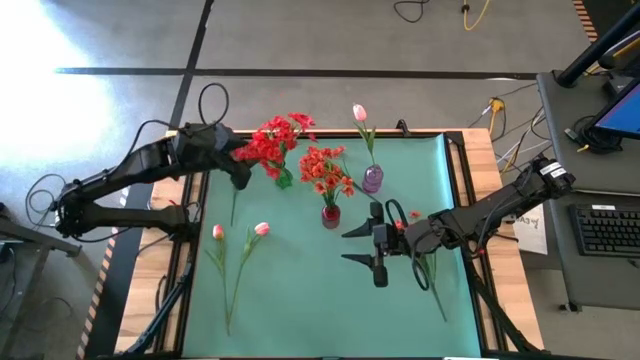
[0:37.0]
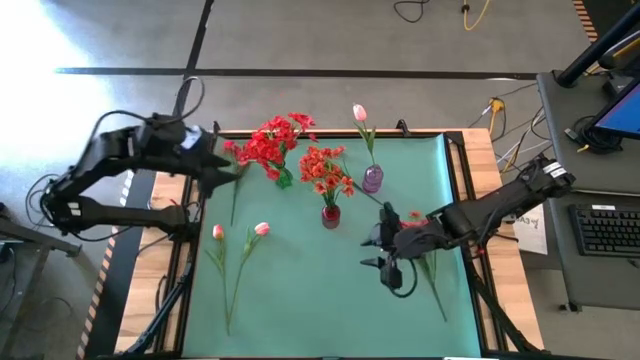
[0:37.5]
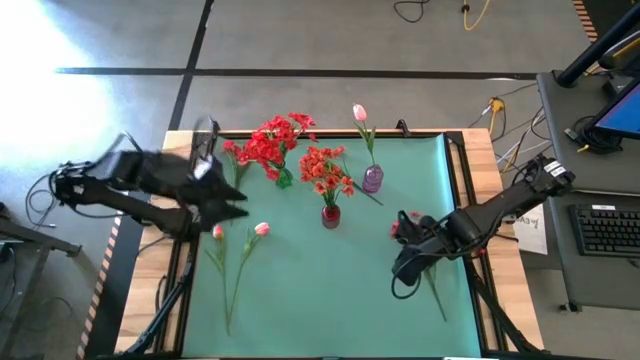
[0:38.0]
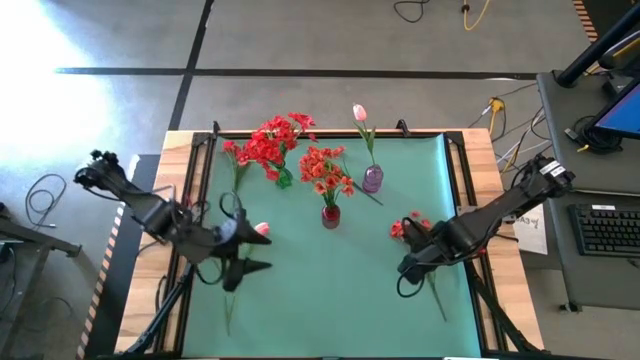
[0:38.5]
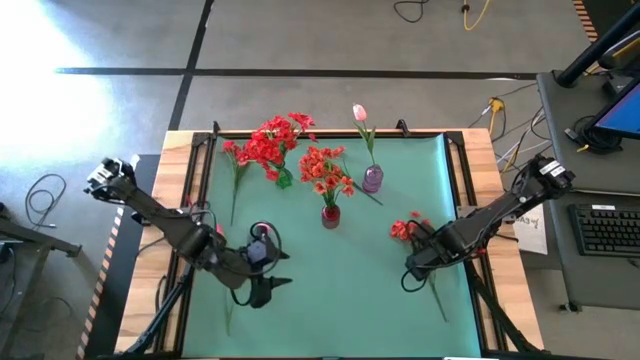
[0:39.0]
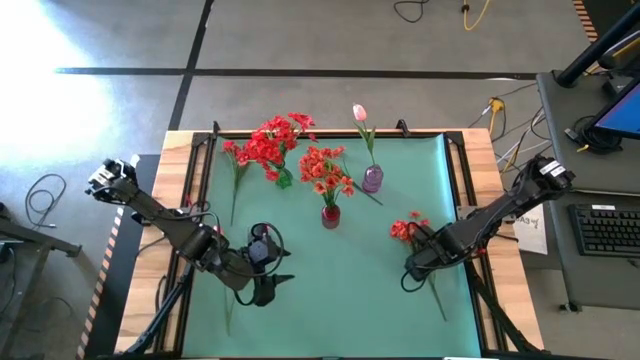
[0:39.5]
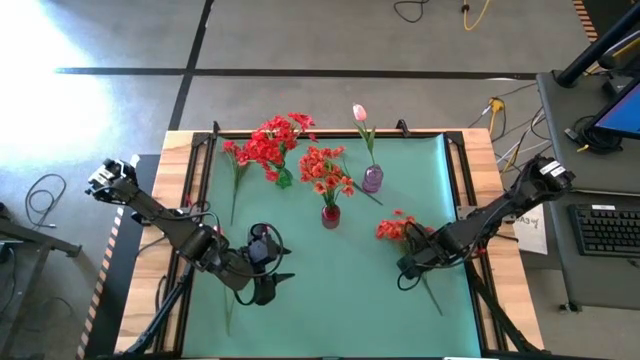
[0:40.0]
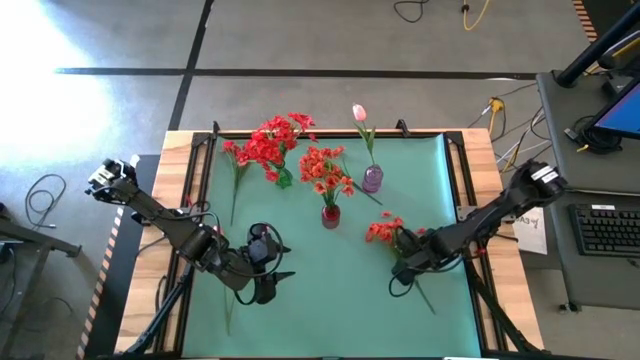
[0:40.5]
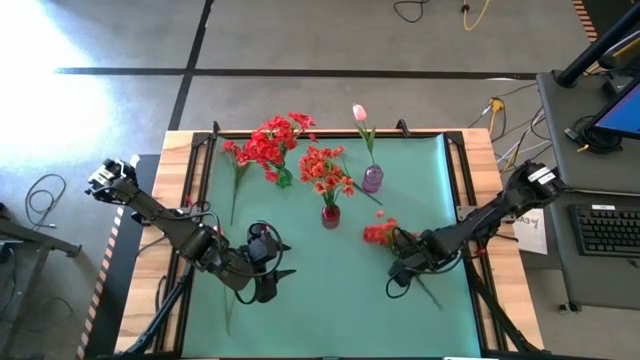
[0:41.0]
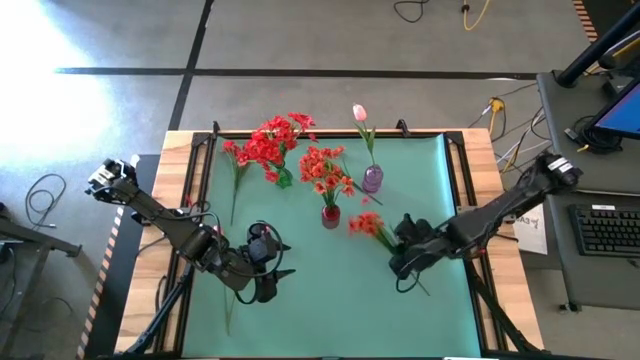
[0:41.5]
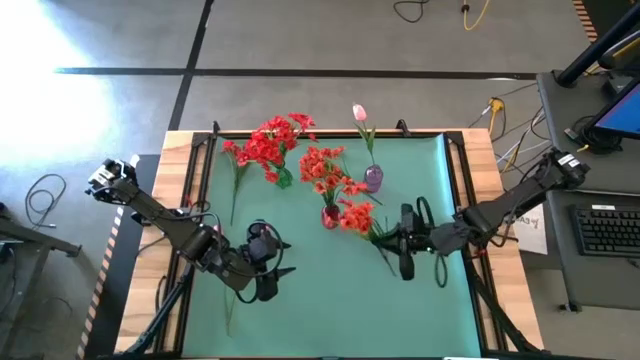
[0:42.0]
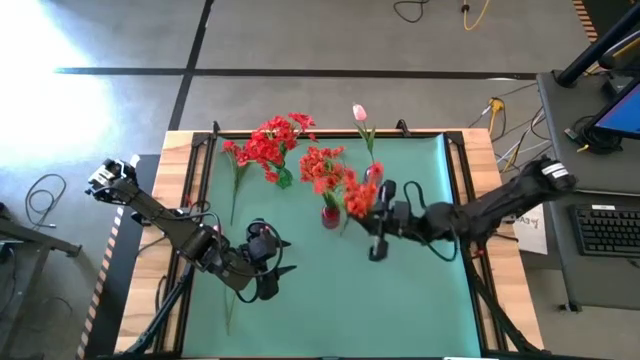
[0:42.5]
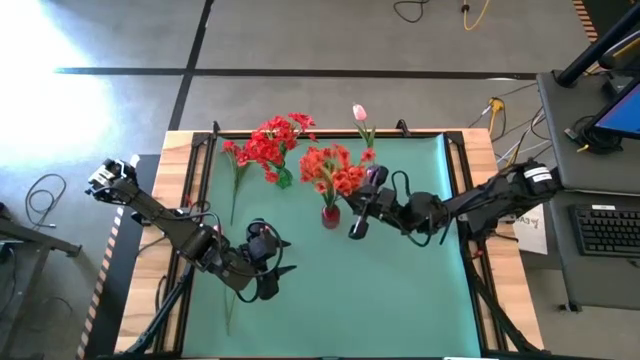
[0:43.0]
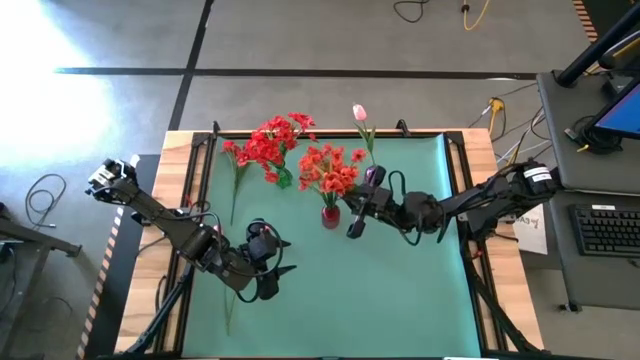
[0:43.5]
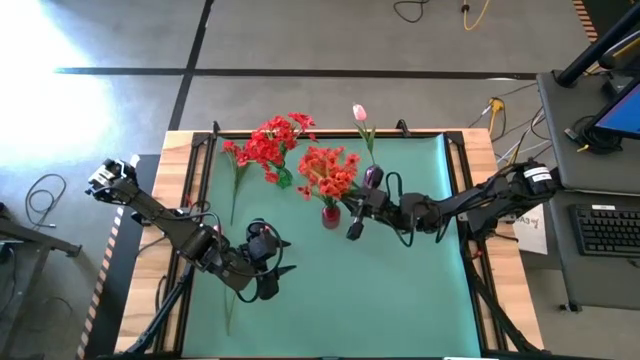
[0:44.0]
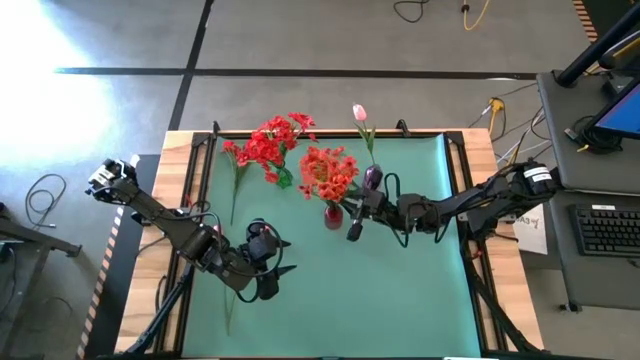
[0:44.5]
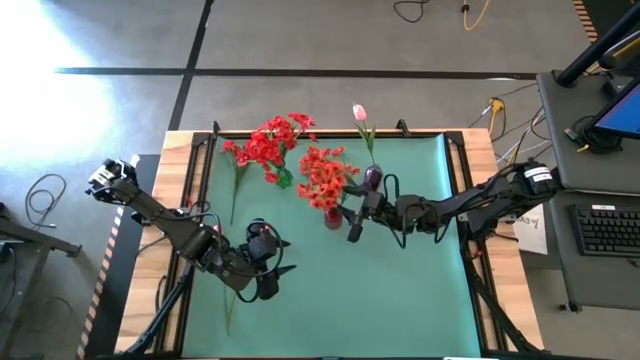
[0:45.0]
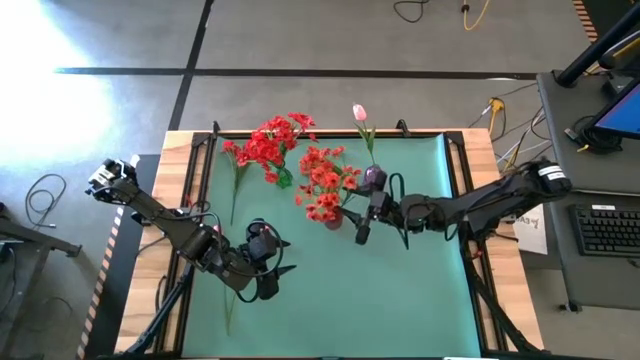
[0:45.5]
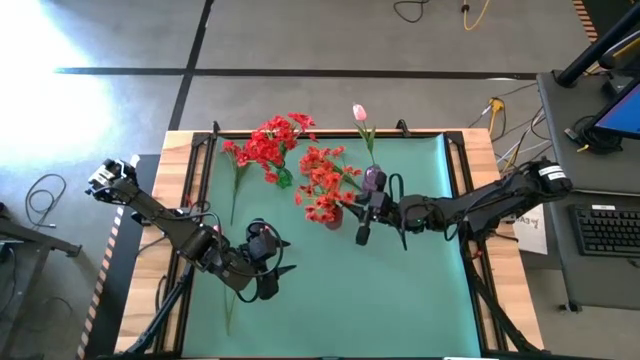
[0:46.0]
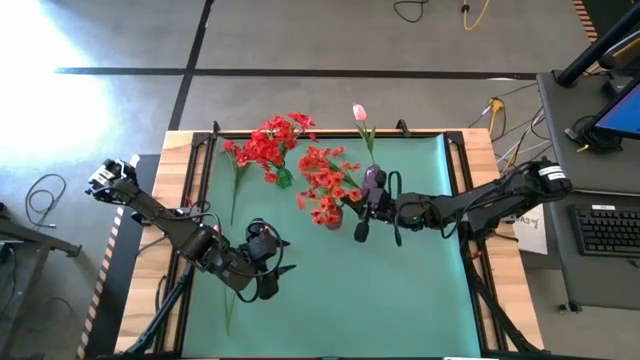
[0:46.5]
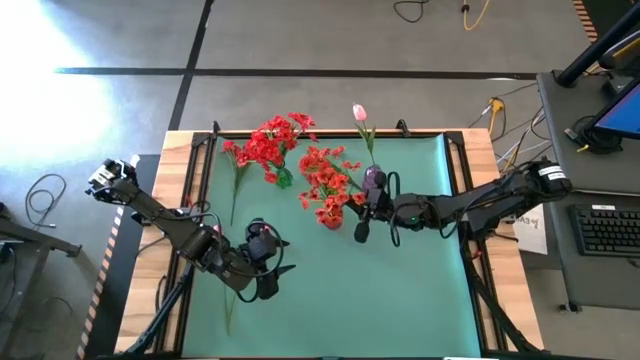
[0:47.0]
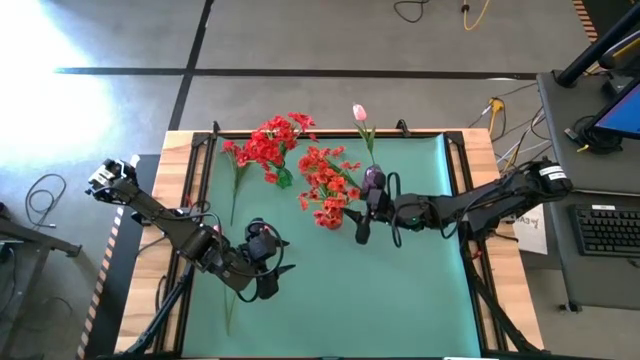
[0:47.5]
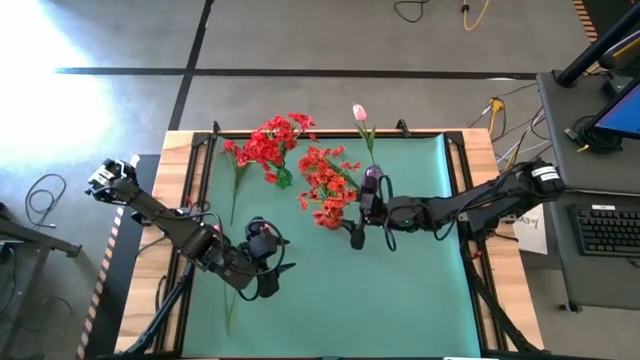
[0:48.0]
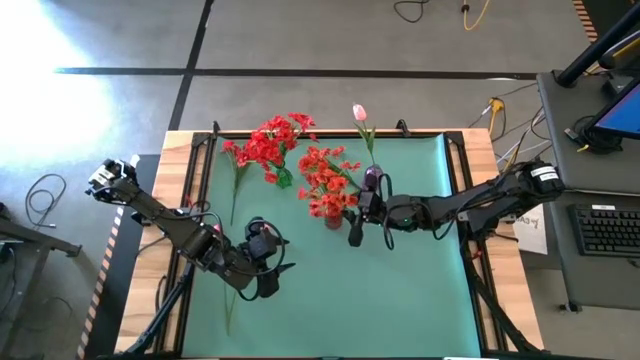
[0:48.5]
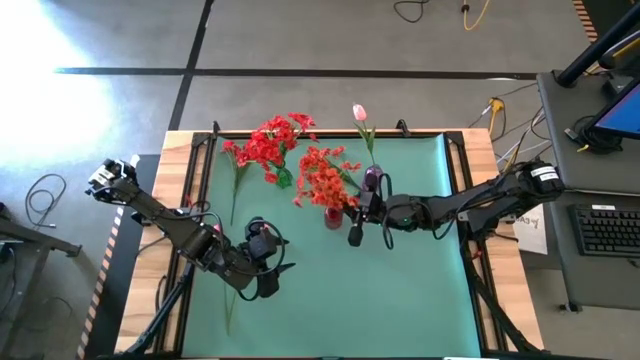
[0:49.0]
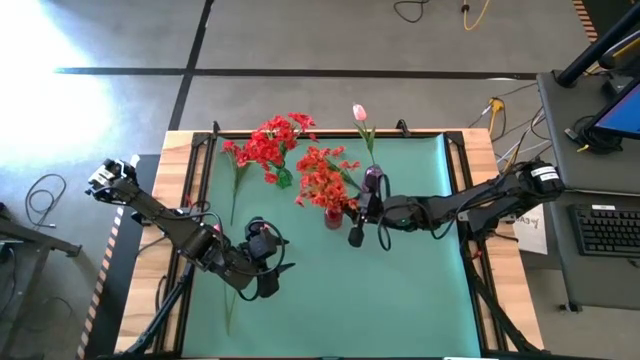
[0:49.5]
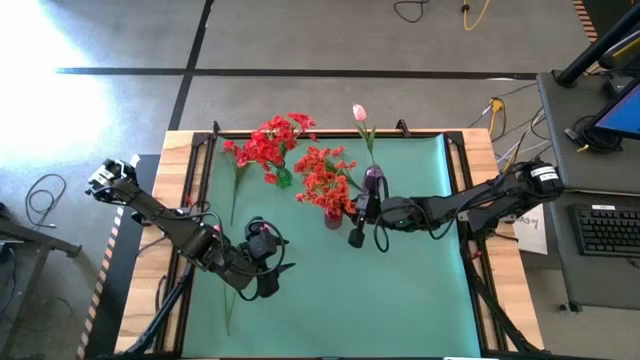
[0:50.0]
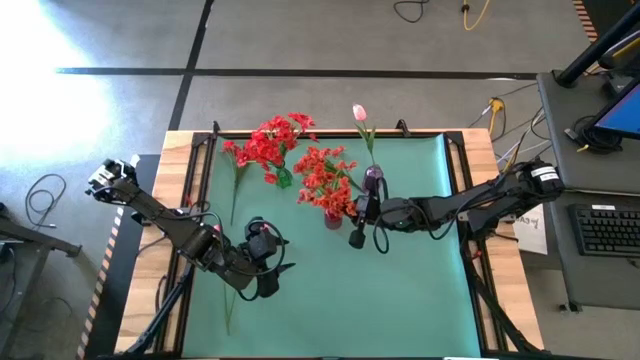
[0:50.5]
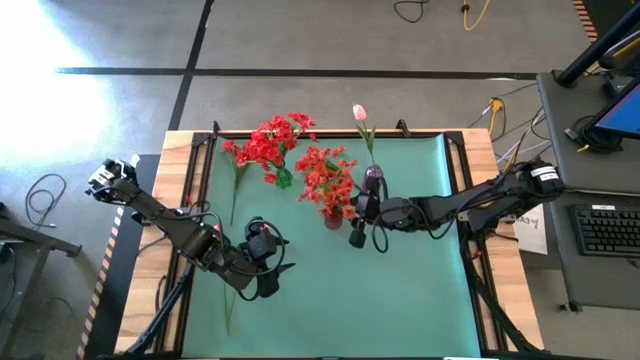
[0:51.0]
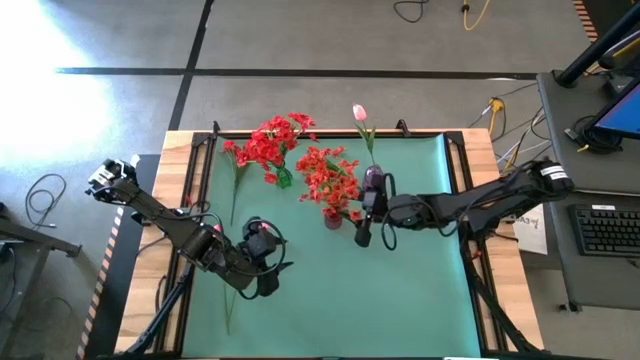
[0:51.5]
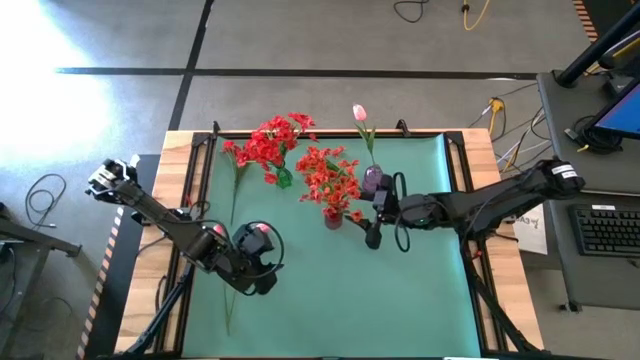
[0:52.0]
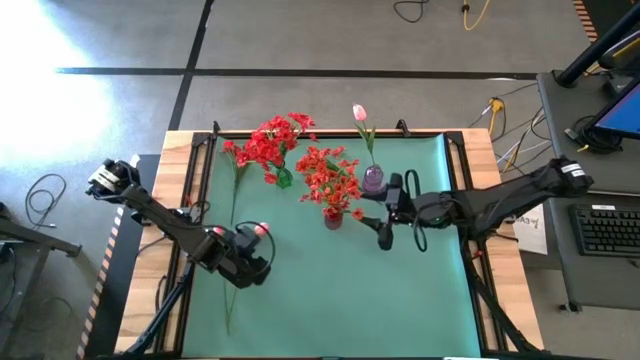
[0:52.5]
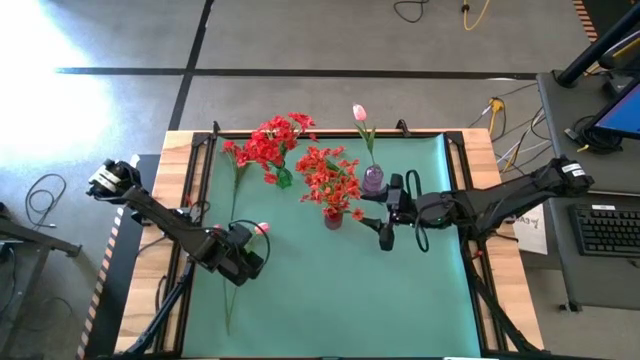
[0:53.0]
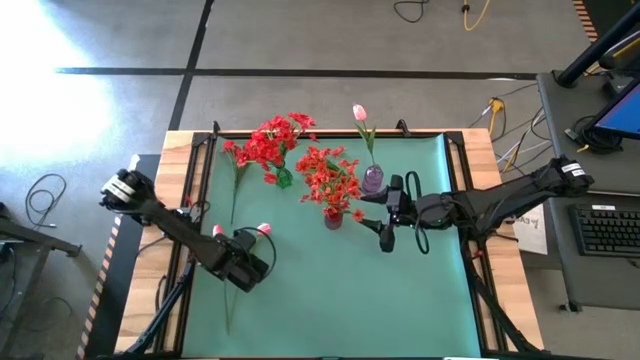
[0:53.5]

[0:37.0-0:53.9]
Task: Sort flowers into vase by color
Put the orange flowers into the red vase

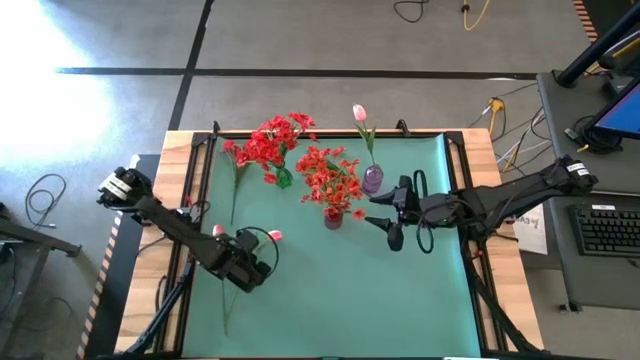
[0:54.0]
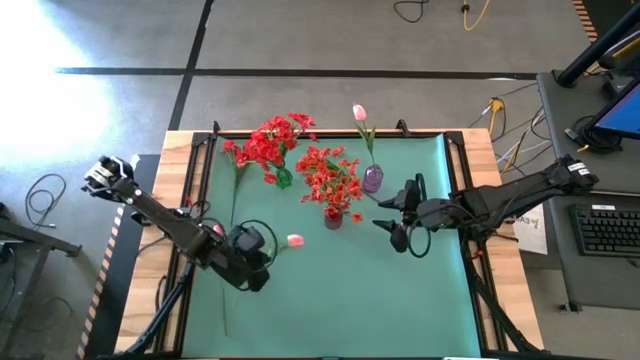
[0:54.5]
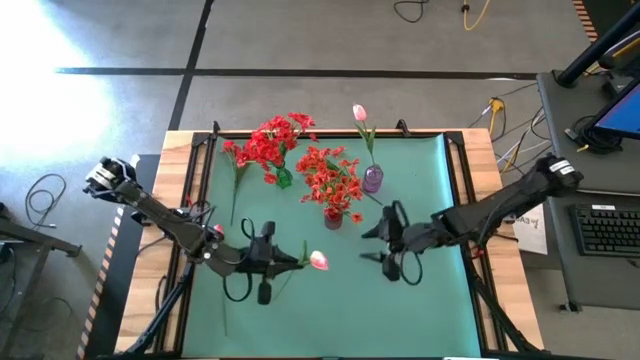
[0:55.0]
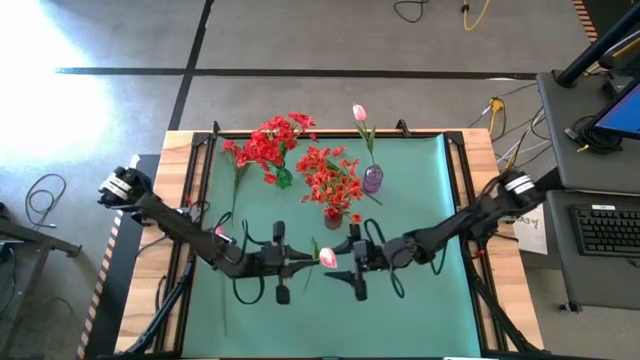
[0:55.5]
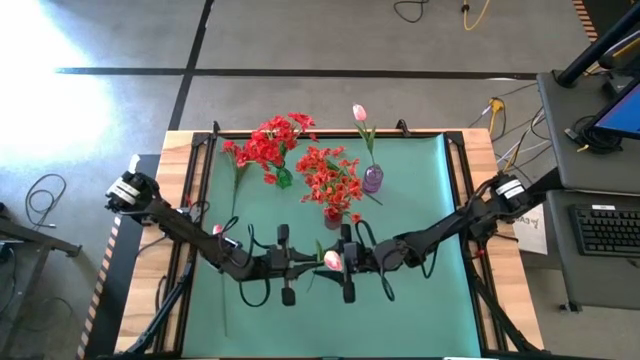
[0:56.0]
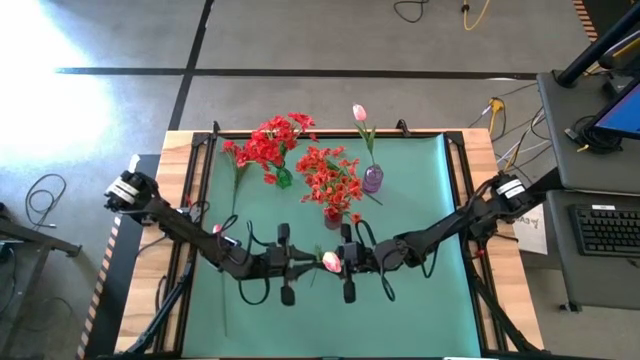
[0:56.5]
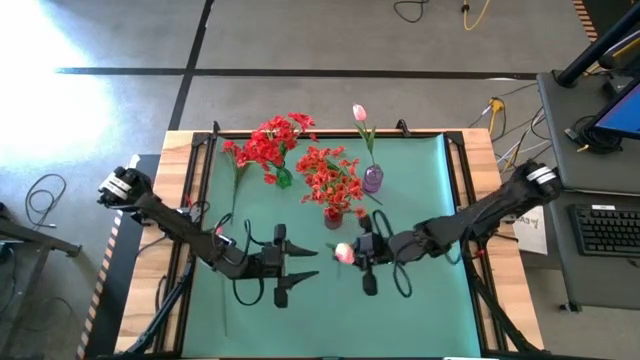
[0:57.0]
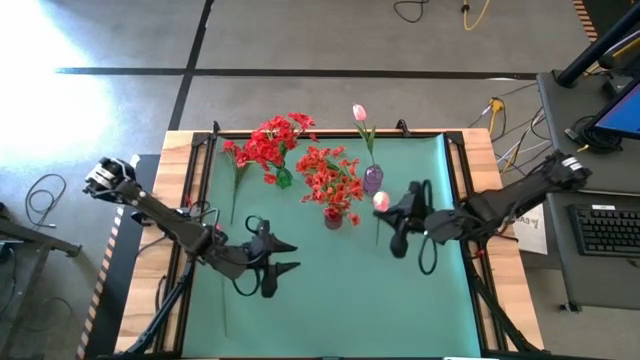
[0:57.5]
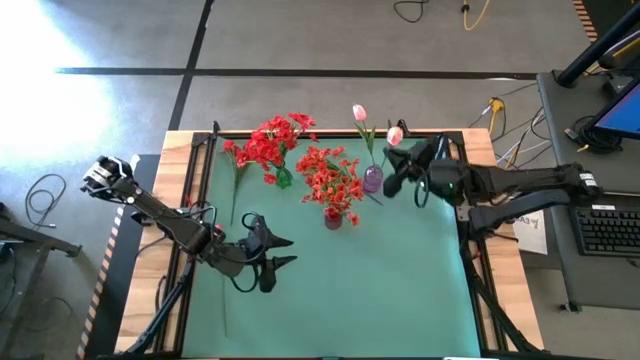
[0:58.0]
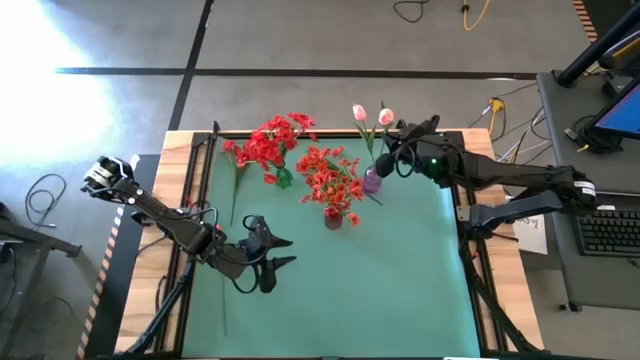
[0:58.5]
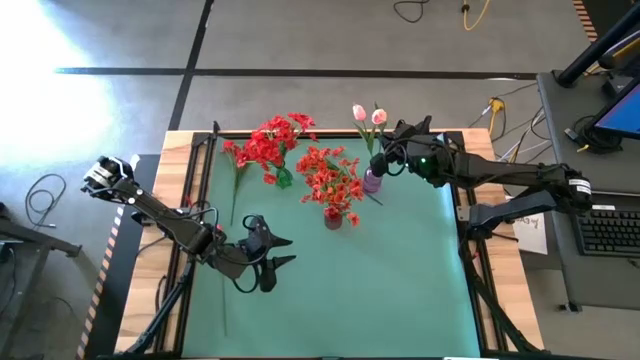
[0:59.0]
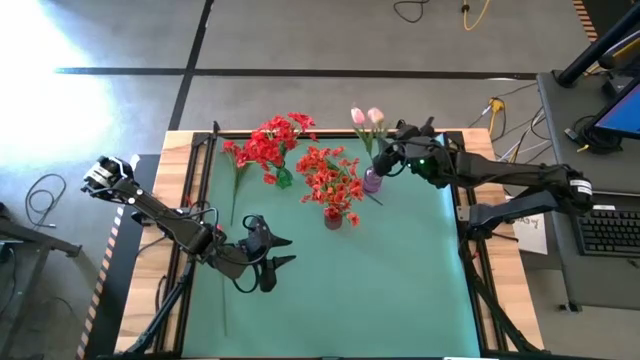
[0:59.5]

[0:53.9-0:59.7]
Put the pink tulip into the purple vase
